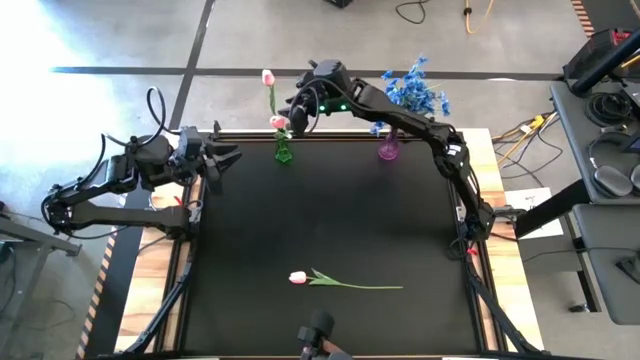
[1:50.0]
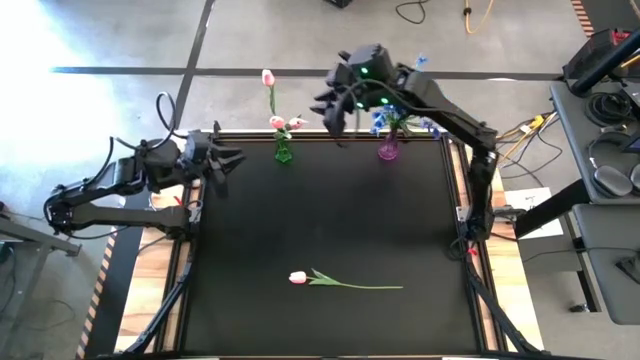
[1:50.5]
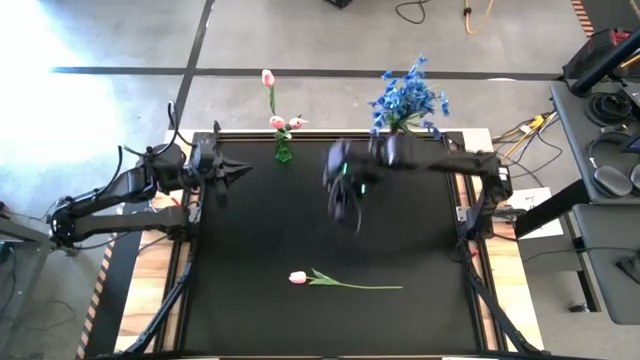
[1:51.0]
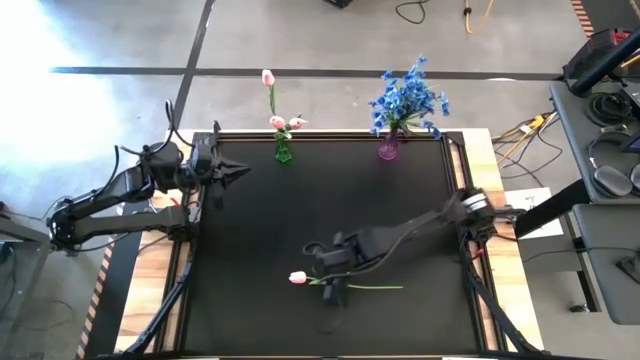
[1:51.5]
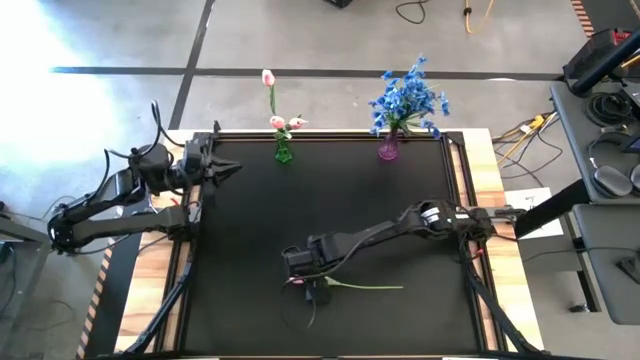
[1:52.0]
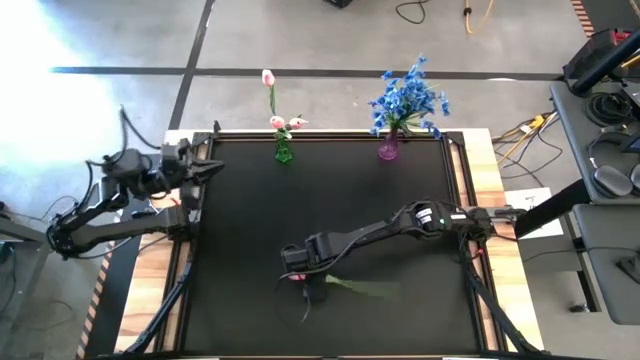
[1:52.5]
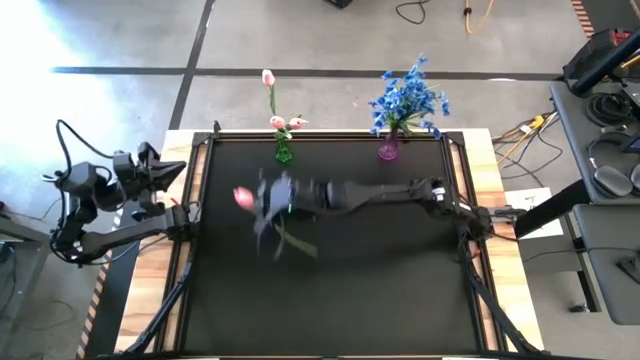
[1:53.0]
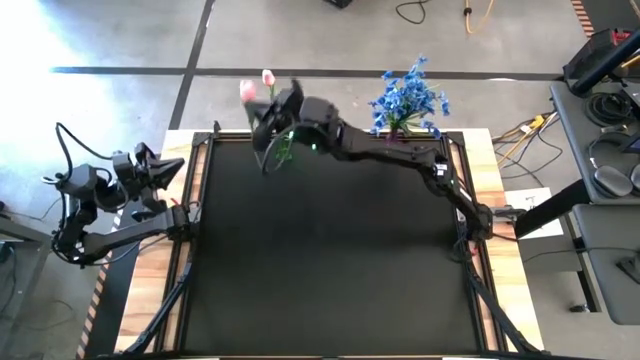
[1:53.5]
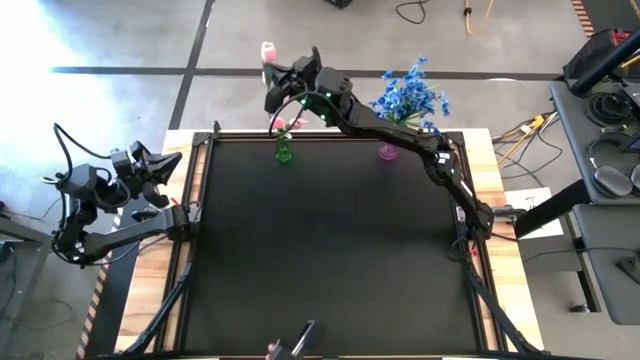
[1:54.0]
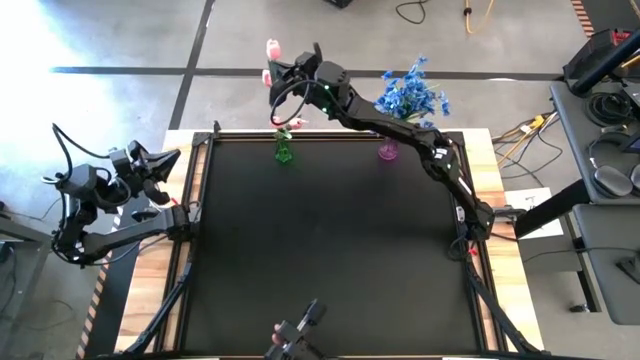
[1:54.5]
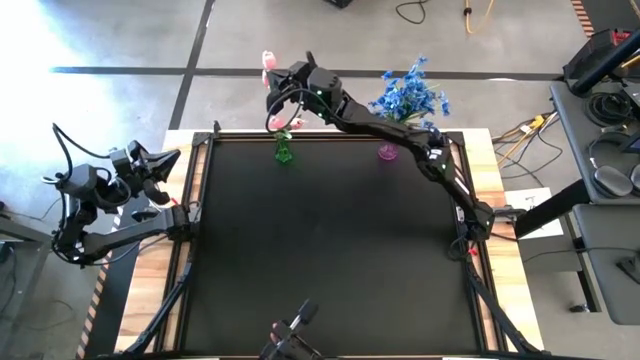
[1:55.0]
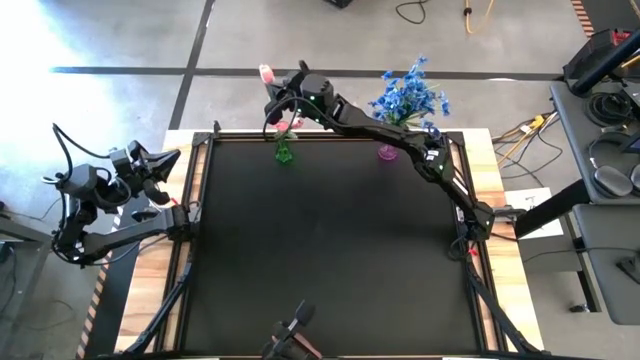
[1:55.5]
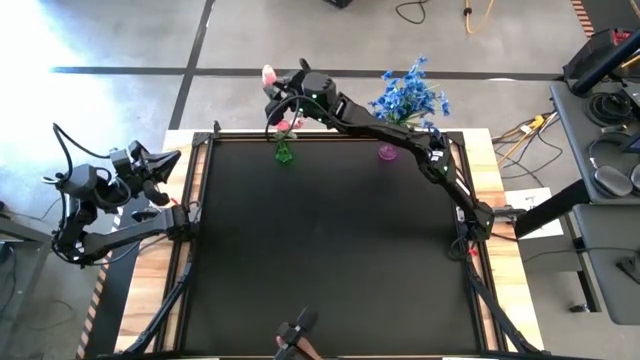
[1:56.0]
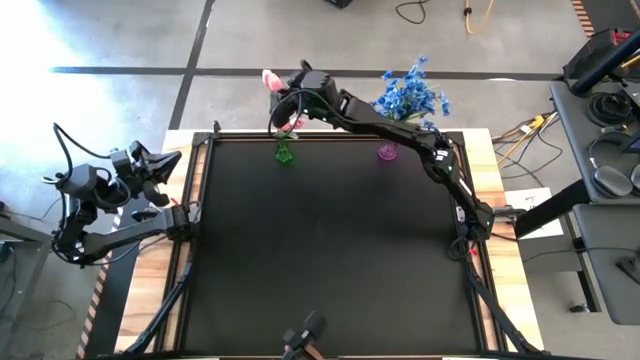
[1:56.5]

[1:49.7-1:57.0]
Task: Sort flowers into vase by color
Put the pink tulip into the green vase

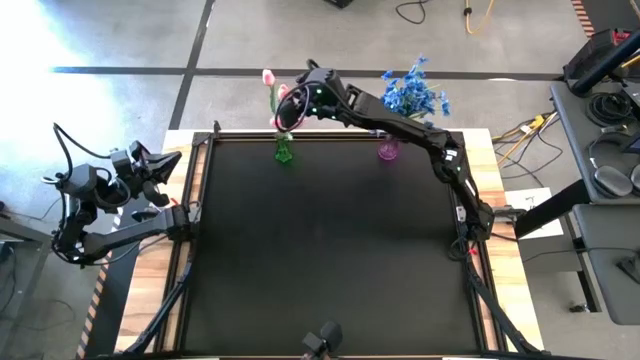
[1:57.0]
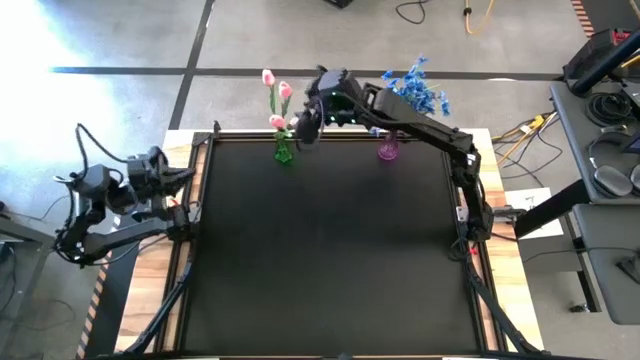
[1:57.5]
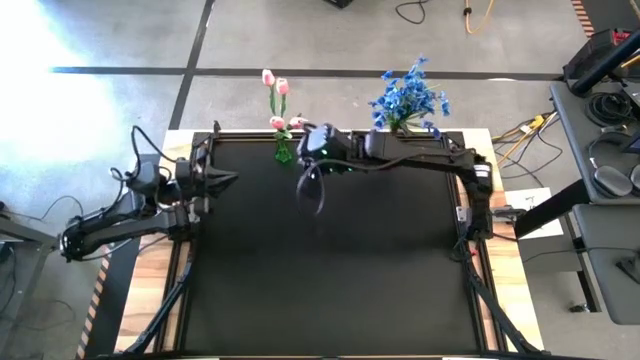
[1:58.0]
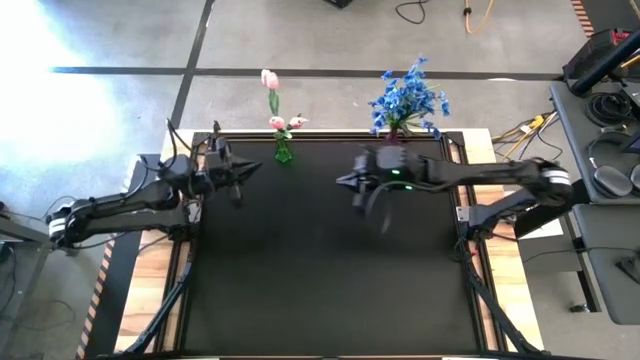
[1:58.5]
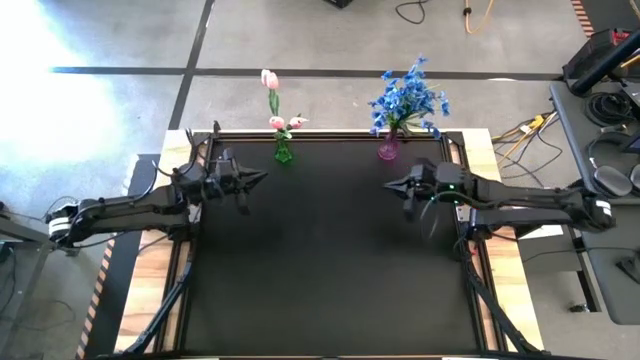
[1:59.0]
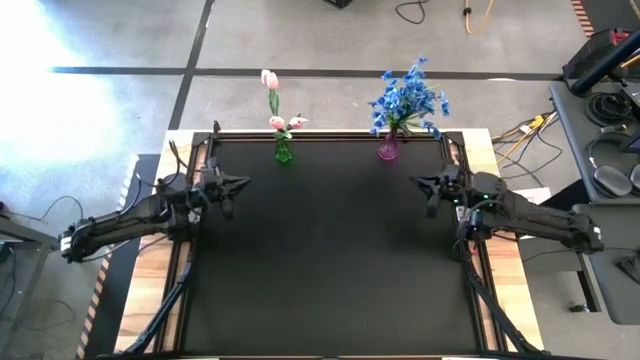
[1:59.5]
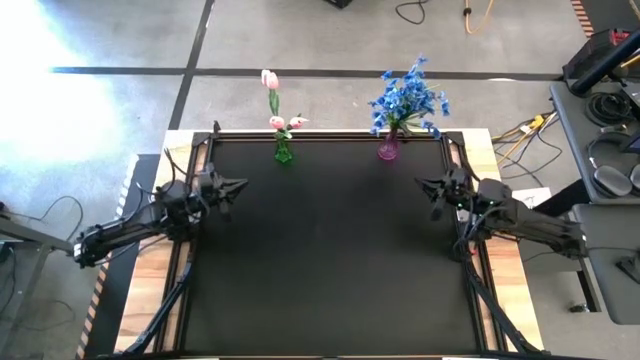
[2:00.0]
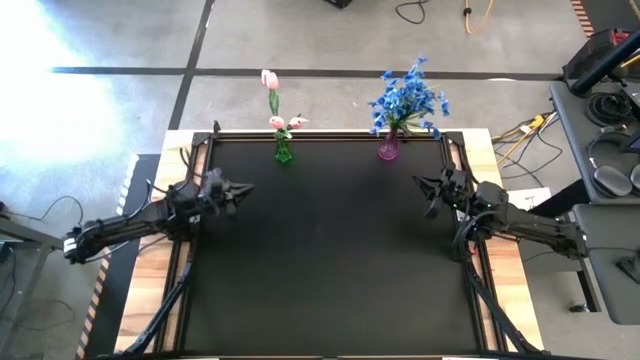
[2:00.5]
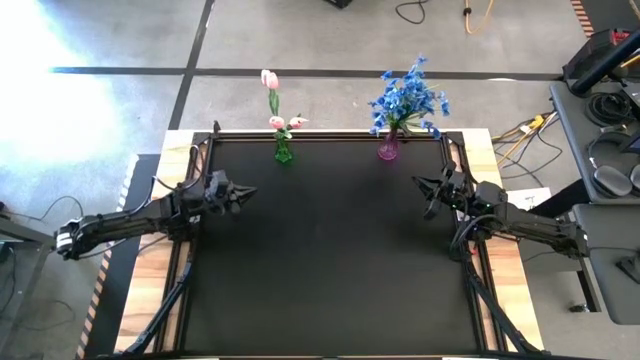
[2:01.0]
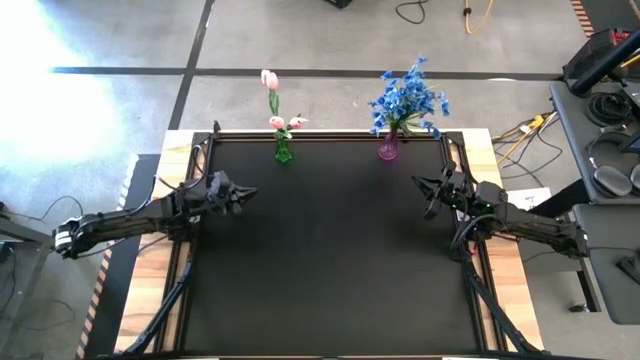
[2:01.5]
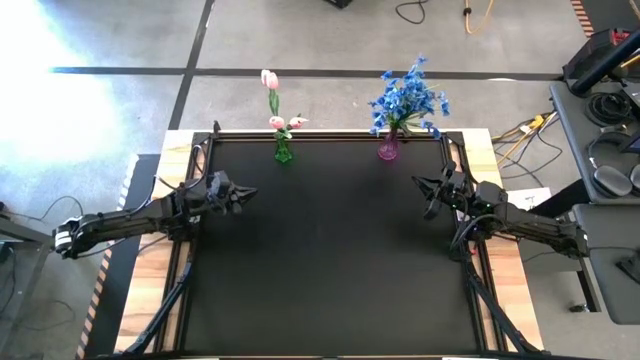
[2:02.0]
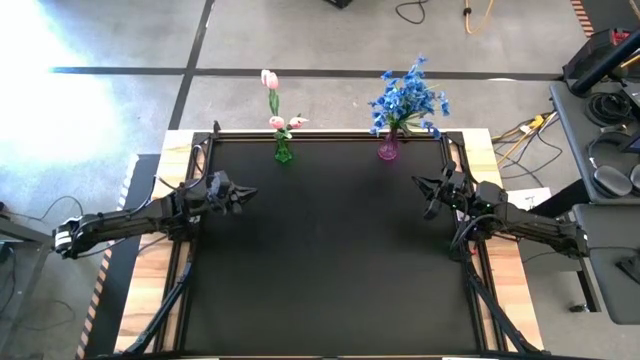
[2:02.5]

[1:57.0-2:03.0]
Return to Home Position

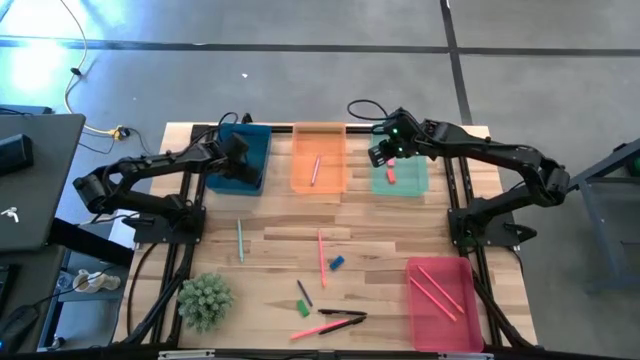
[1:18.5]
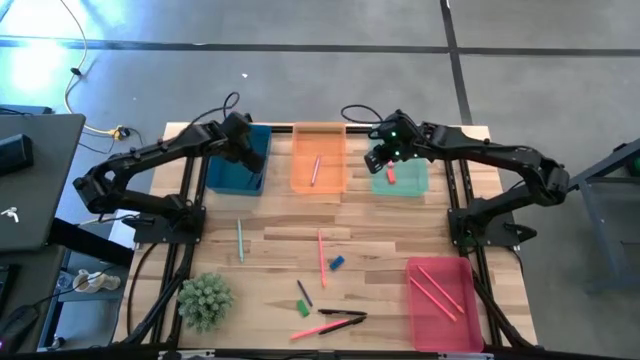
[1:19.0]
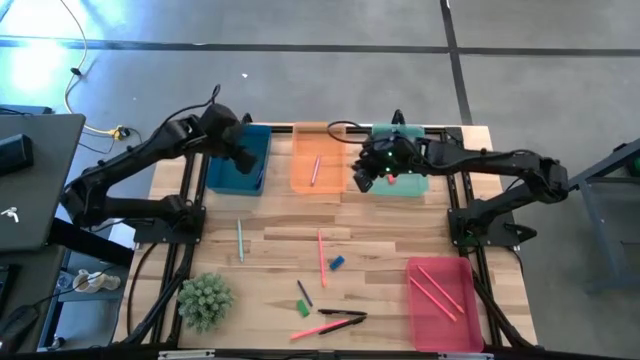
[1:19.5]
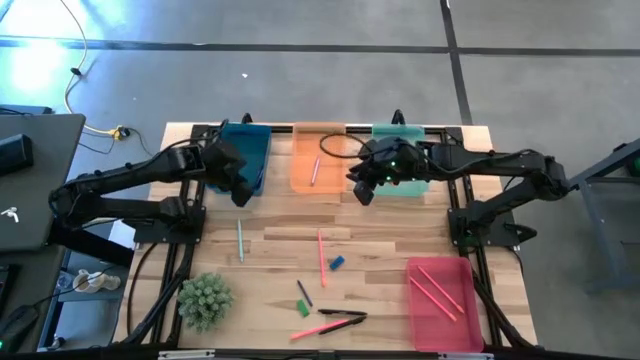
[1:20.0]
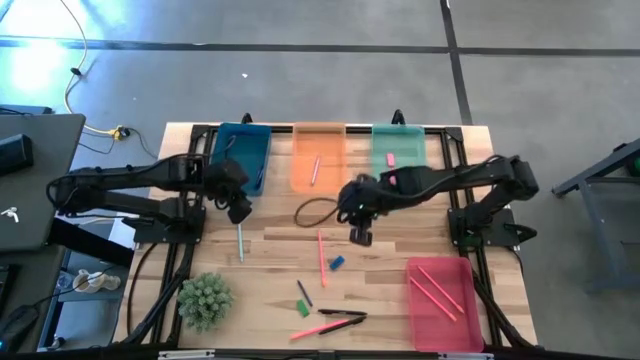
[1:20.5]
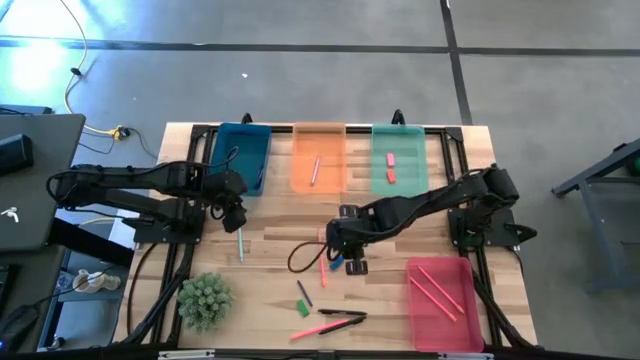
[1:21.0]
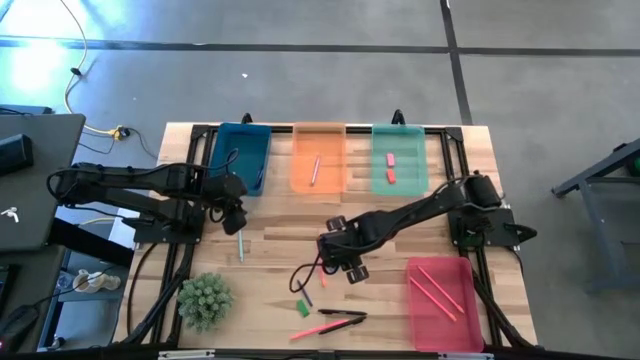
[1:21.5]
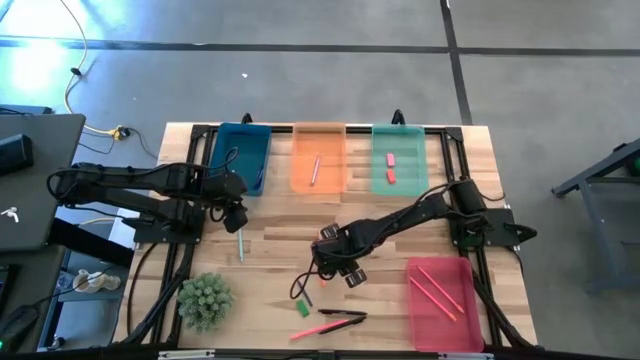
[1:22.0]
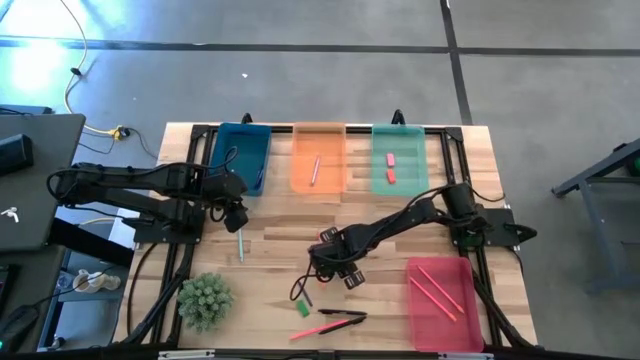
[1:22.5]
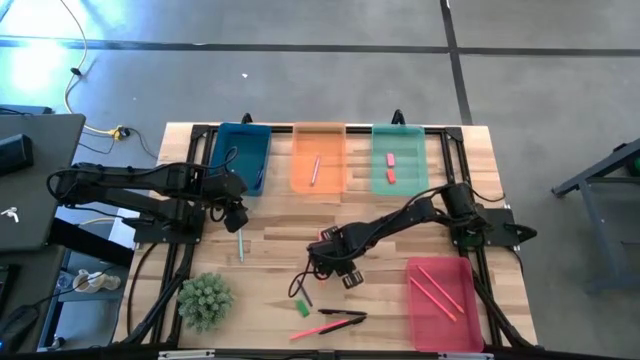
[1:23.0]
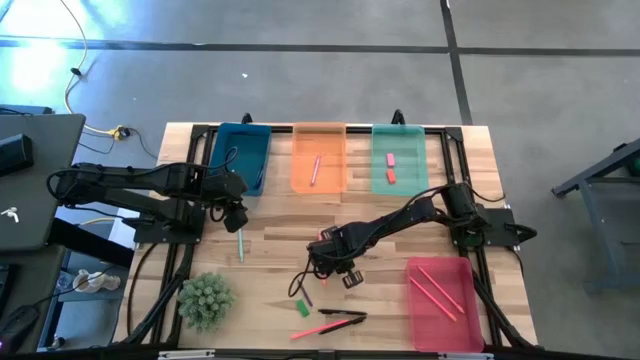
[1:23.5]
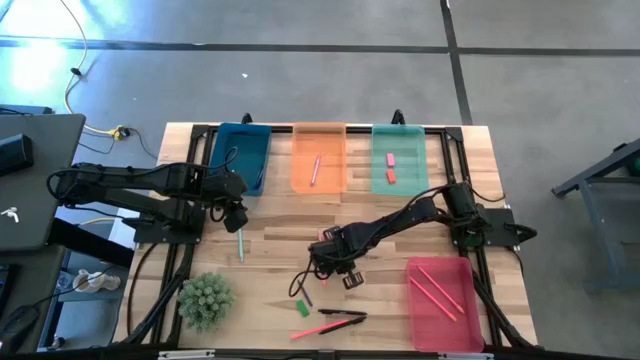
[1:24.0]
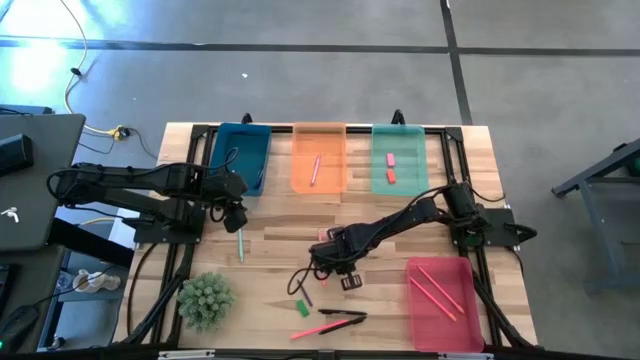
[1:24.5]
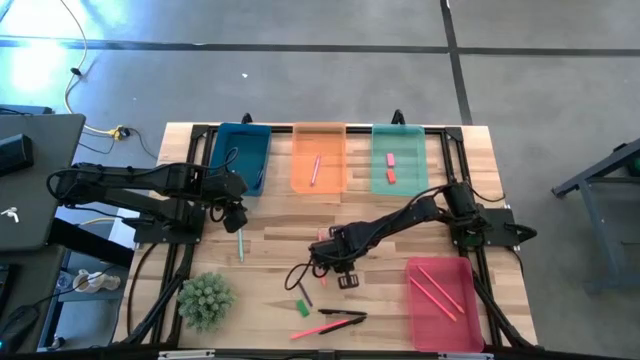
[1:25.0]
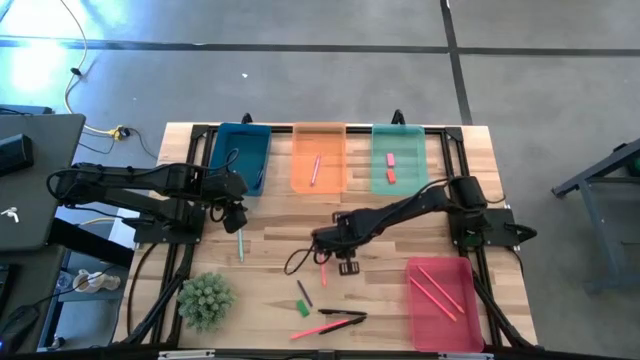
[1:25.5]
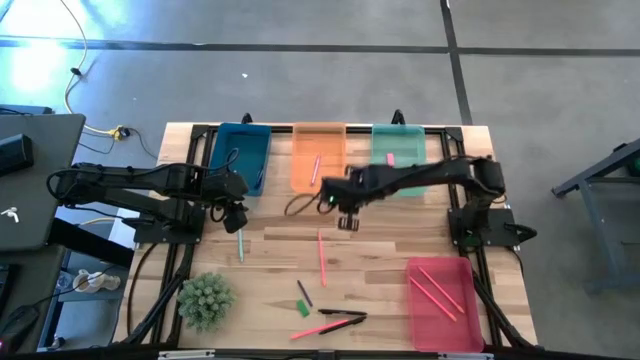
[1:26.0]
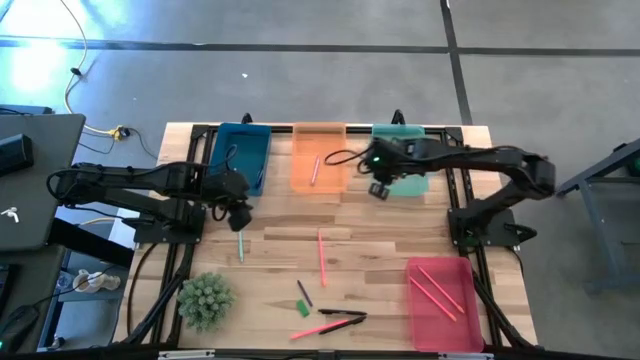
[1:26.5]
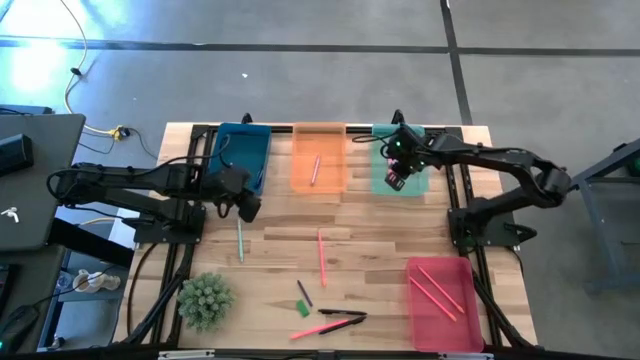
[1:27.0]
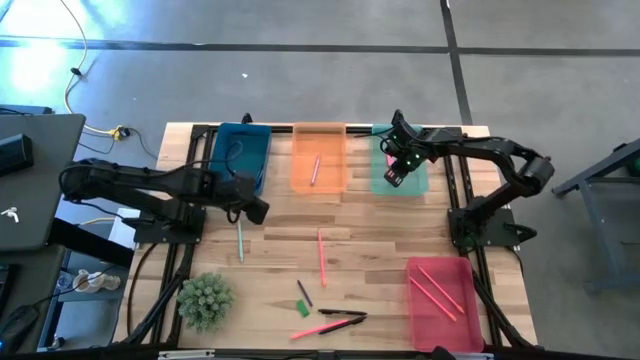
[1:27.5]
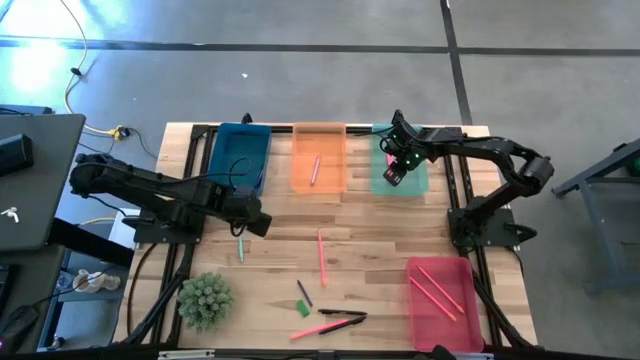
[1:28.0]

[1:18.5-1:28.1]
Task: Sort crayons/erasers/pens/pencils in bins
Put the blue eraser into the green bin
